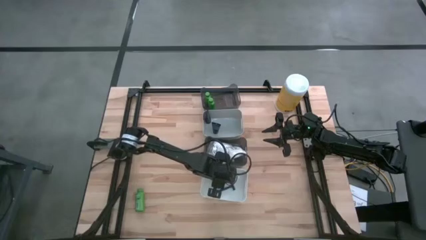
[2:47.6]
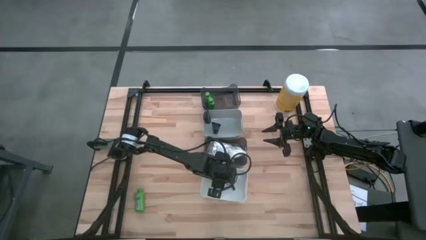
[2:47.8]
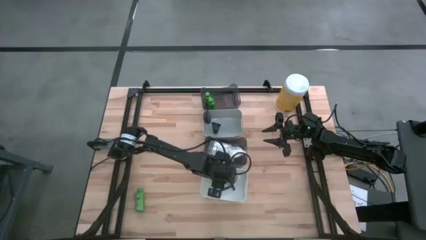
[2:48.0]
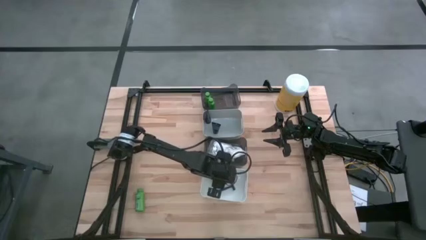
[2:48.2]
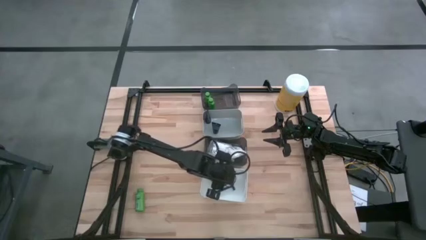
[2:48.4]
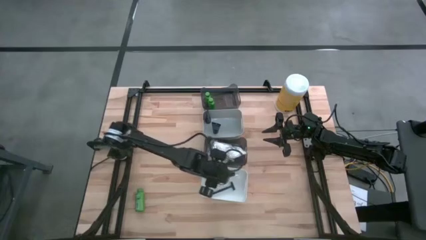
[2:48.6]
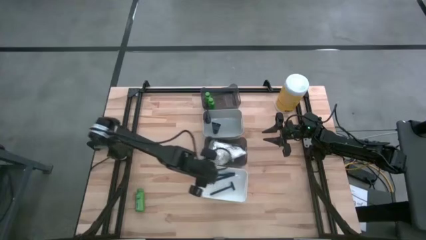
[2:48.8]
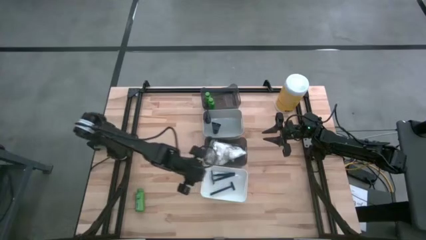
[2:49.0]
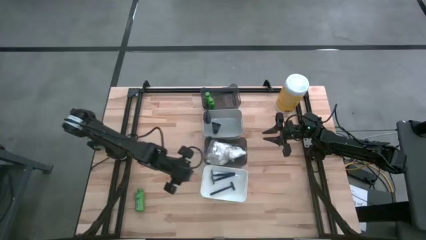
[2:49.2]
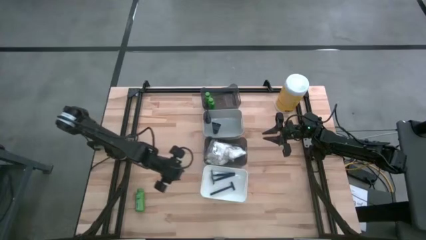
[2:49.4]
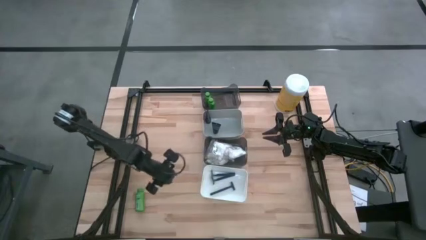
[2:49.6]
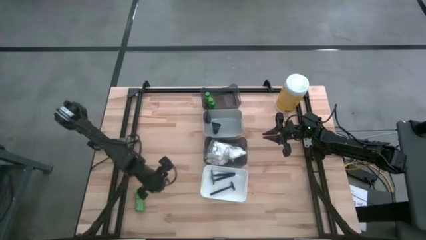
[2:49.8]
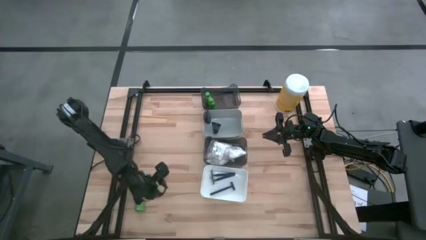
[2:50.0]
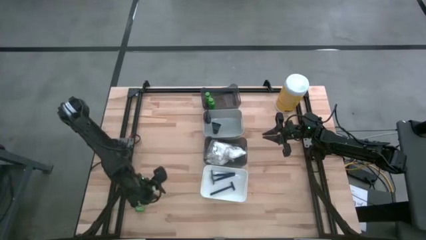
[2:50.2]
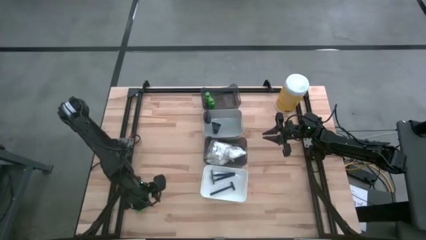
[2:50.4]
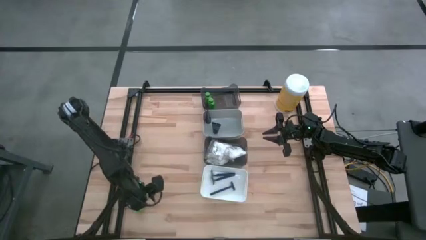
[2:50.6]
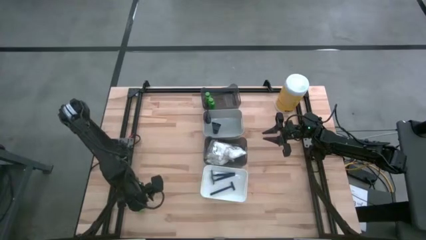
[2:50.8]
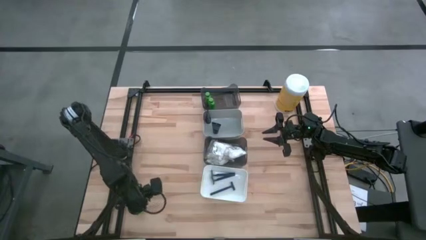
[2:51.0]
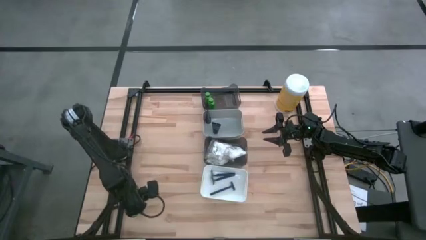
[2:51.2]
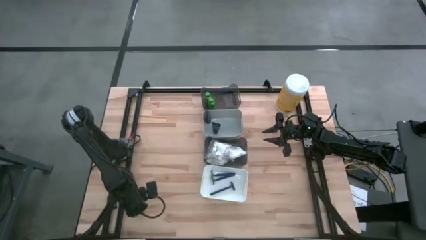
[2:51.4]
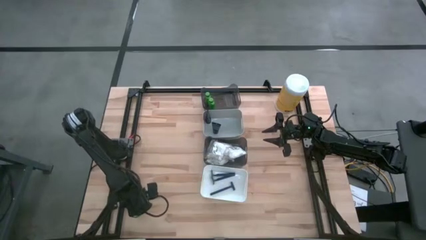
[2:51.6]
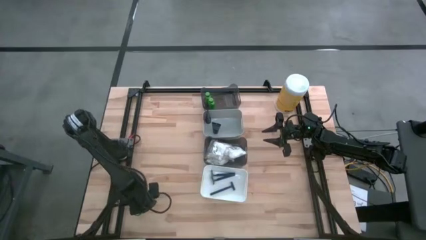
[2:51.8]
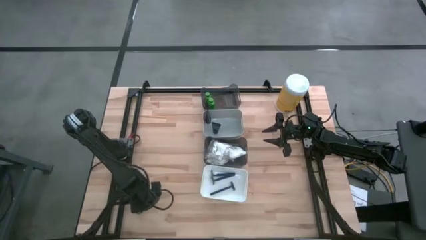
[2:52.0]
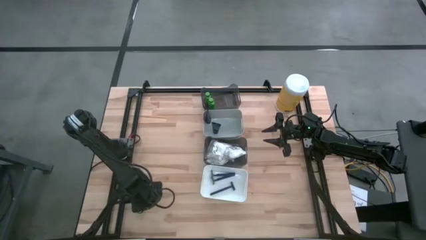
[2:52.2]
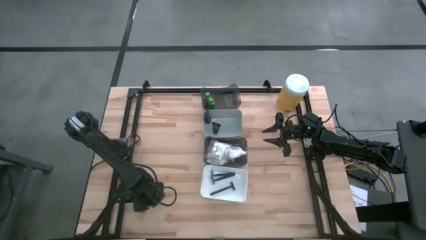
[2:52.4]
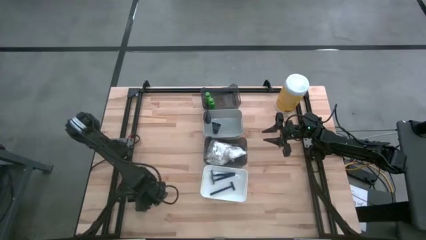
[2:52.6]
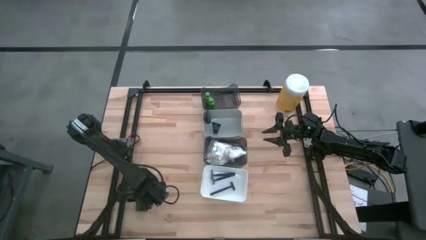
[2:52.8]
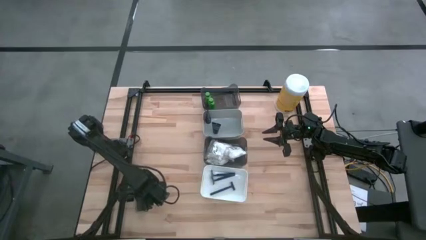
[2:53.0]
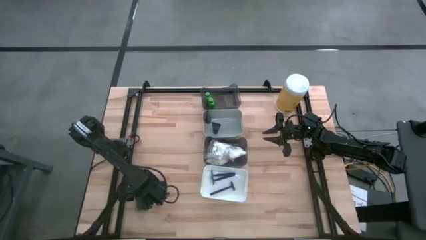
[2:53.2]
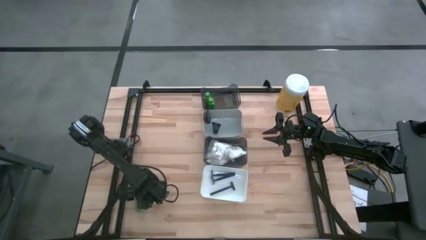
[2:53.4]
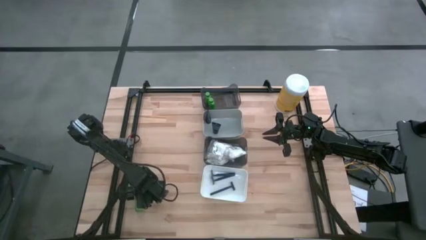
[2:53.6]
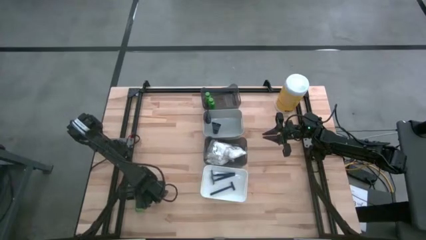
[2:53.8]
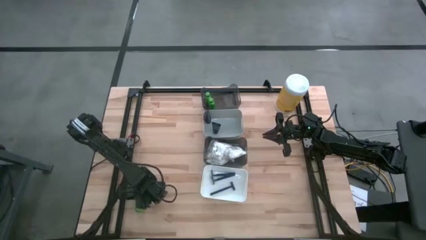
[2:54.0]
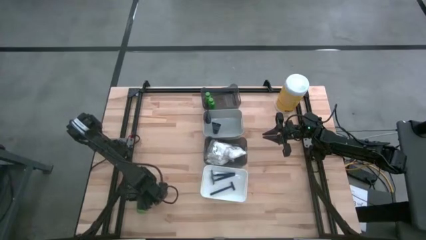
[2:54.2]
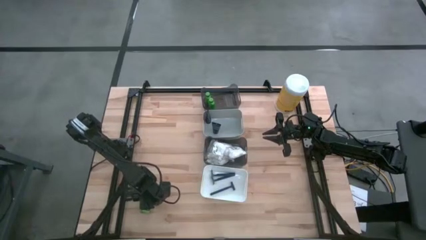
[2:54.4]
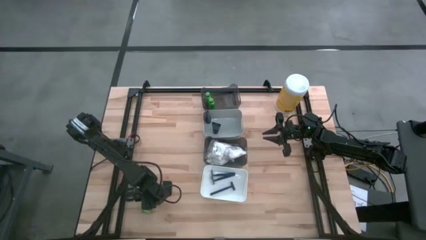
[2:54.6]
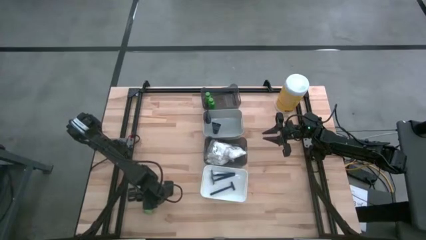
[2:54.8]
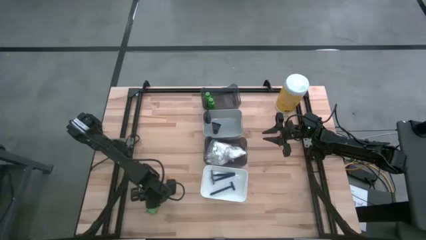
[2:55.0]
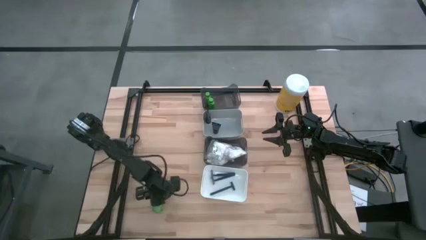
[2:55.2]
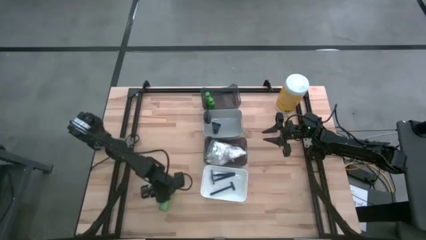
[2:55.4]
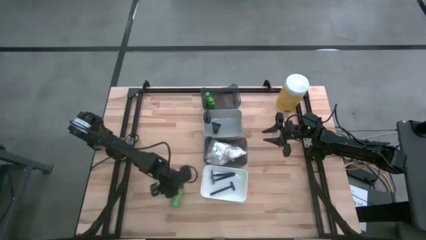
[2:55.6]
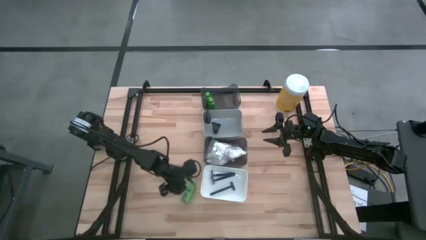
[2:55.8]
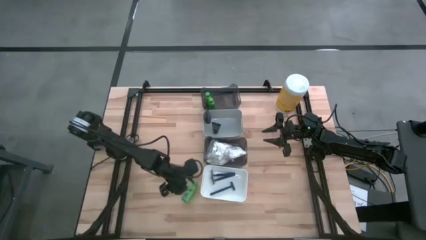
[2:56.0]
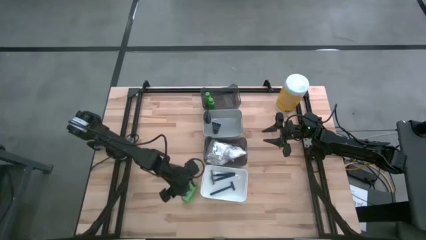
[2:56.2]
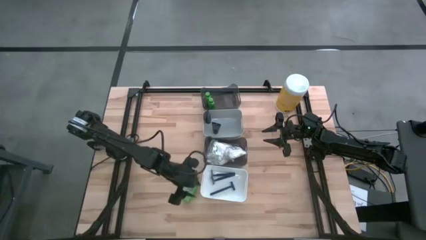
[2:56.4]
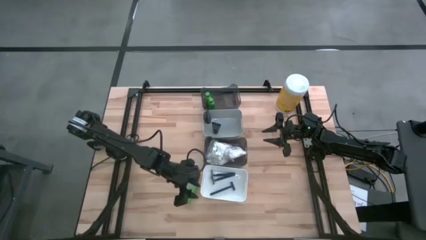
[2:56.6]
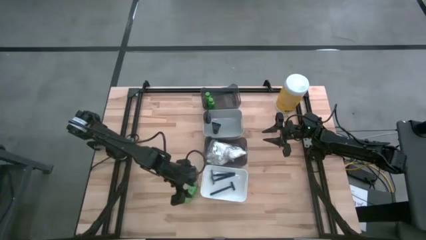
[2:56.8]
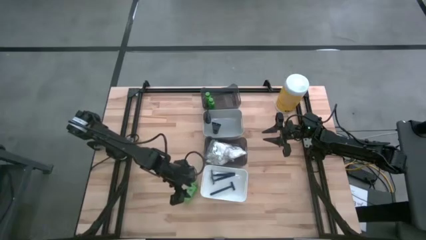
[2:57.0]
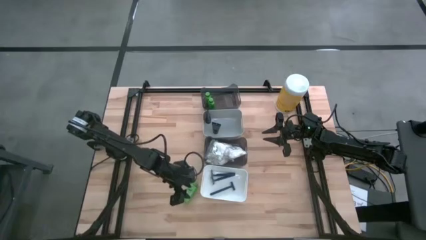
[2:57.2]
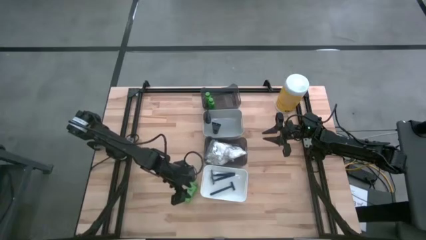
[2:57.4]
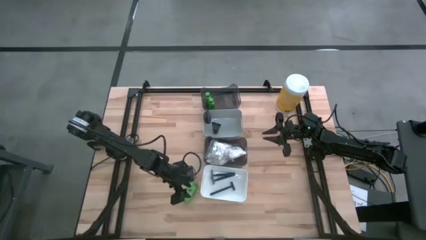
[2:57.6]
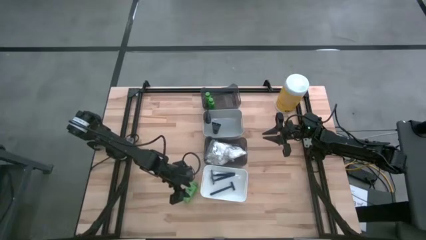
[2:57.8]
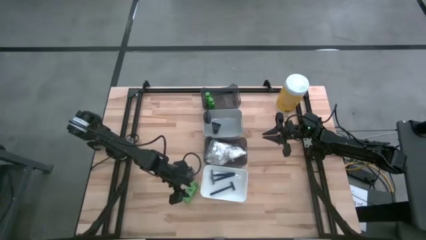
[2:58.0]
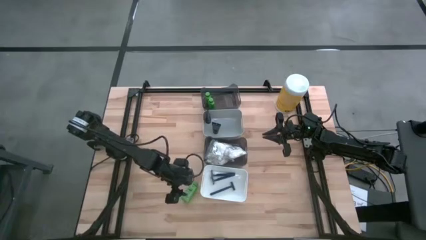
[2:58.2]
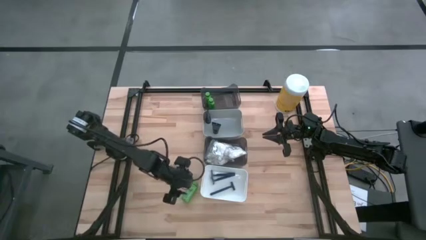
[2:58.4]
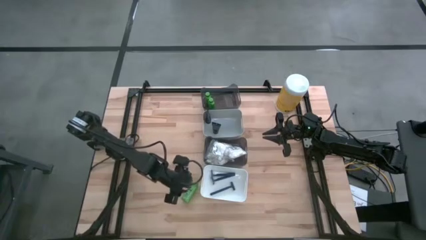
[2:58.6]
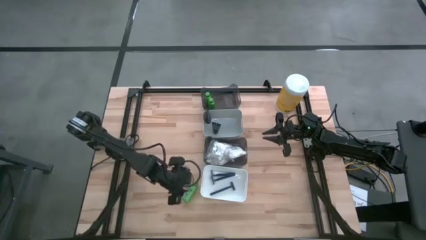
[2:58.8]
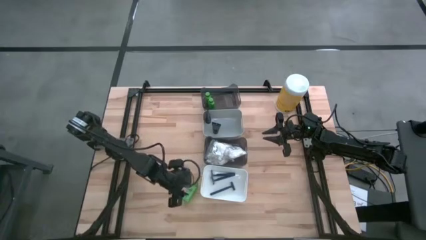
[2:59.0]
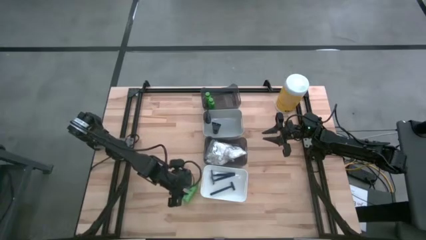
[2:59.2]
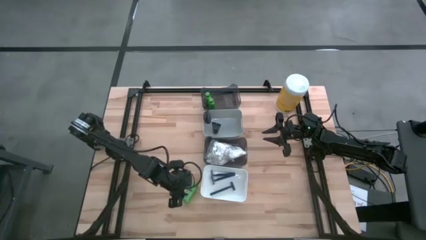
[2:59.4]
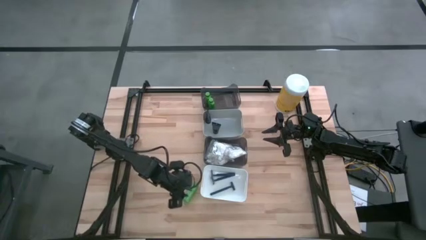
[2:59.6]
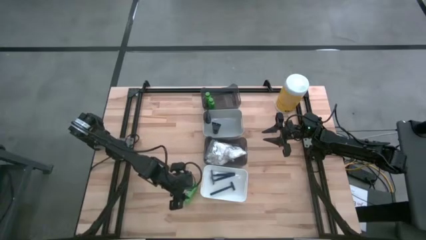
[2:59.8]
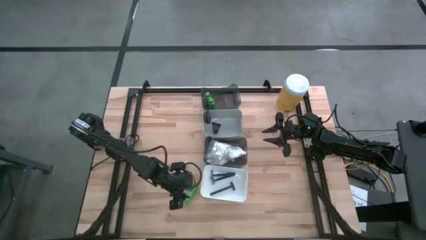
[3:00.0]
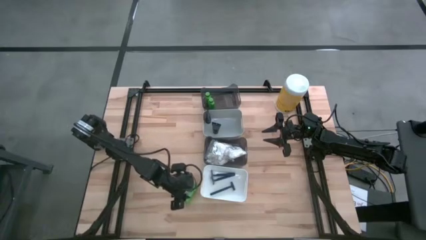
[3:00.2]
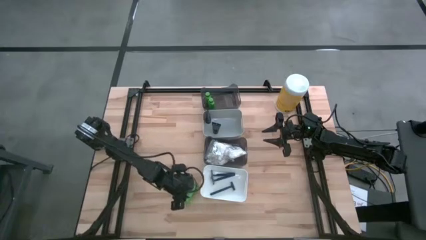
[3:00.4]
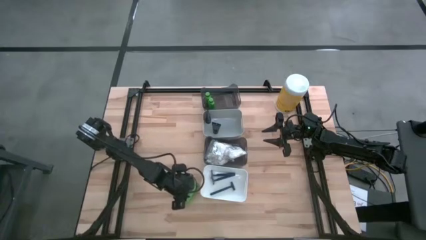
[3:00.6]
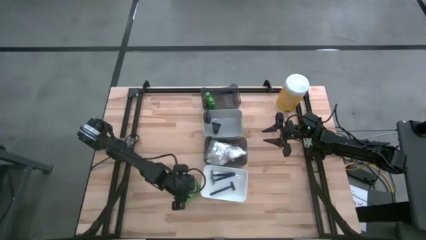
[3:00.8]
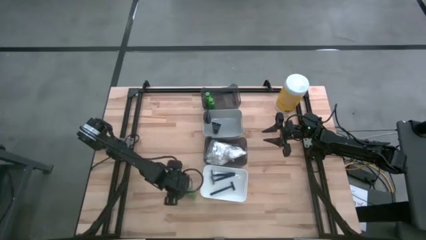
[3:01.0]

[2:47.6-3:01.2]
Task: Pick & Place Travel size toiletries
Put the green shampoo into the top black bin

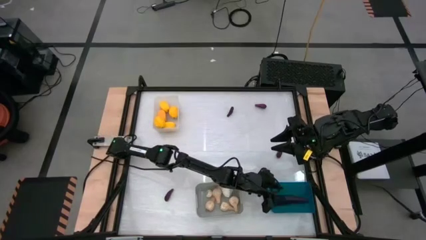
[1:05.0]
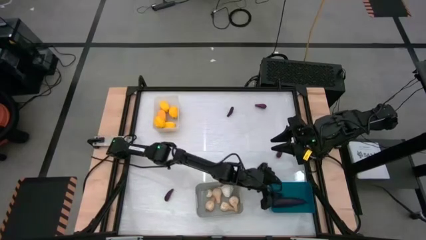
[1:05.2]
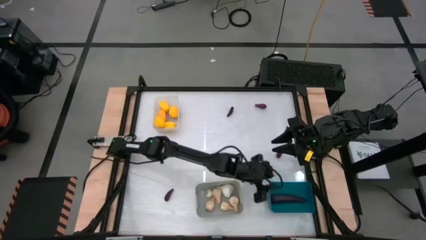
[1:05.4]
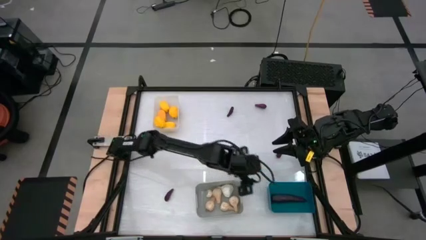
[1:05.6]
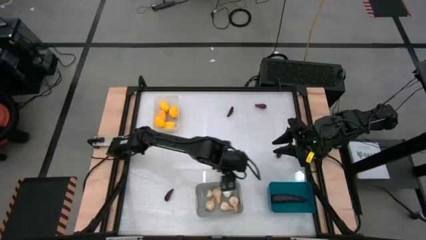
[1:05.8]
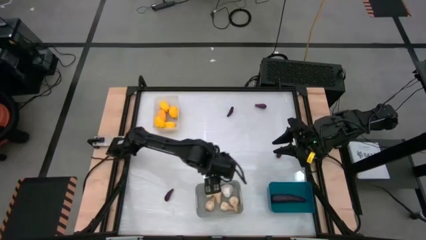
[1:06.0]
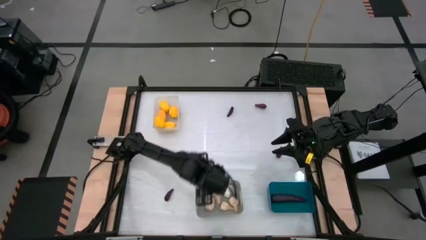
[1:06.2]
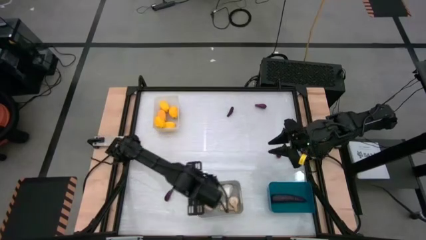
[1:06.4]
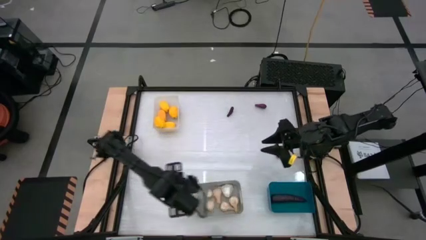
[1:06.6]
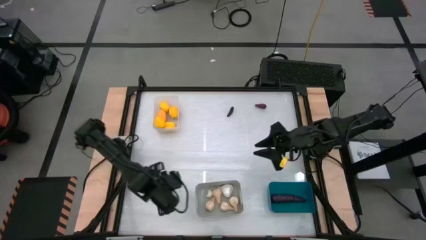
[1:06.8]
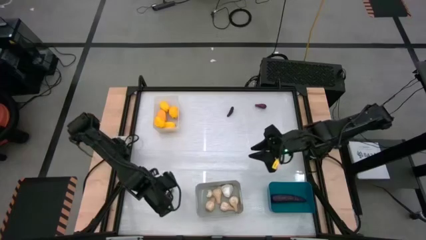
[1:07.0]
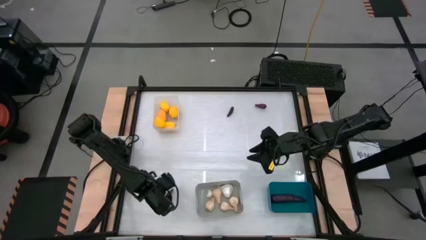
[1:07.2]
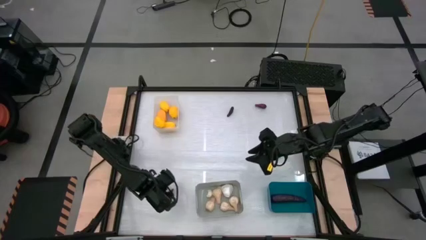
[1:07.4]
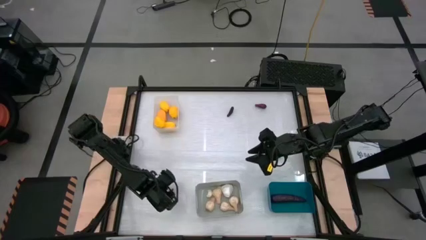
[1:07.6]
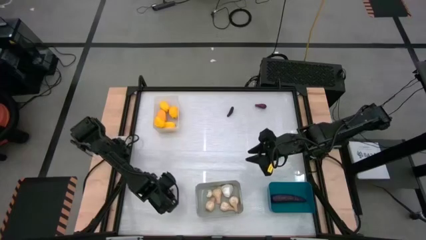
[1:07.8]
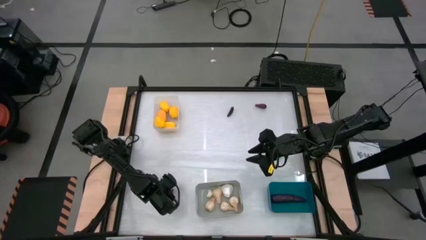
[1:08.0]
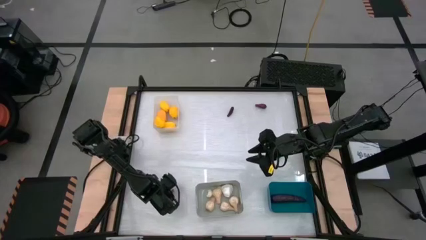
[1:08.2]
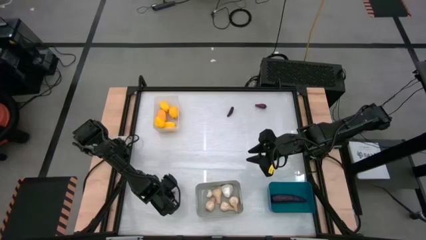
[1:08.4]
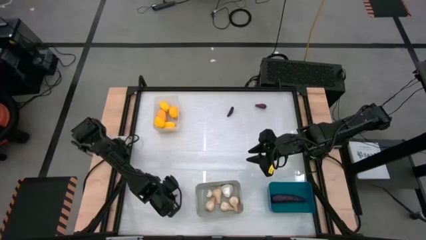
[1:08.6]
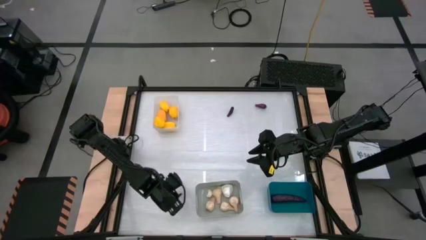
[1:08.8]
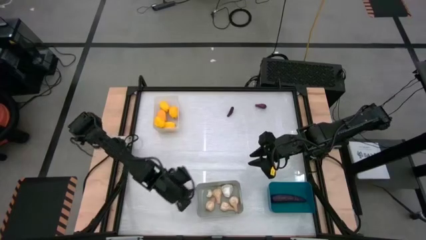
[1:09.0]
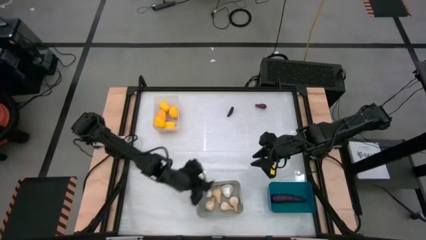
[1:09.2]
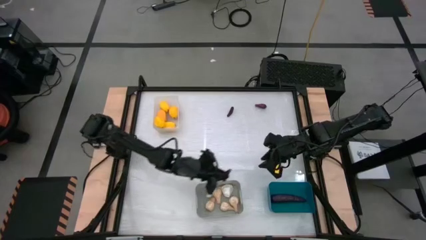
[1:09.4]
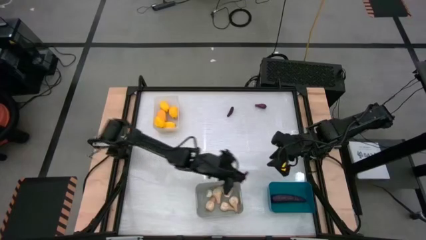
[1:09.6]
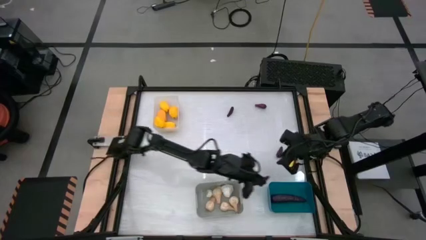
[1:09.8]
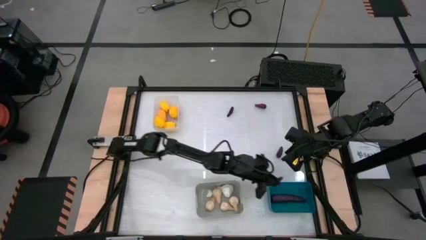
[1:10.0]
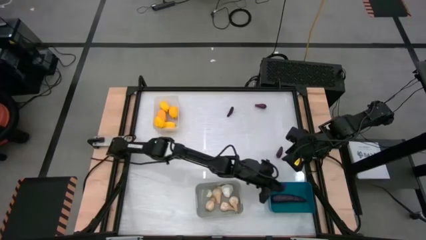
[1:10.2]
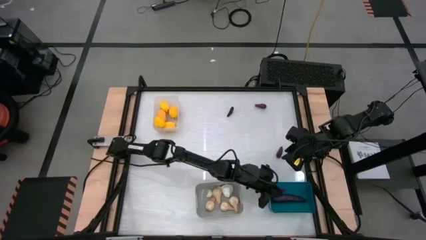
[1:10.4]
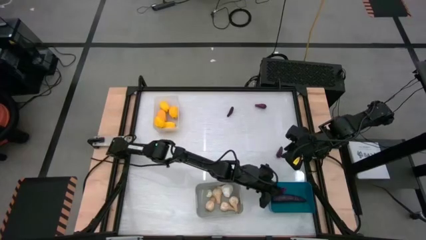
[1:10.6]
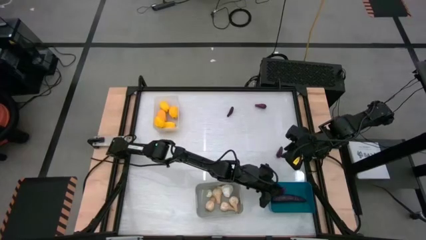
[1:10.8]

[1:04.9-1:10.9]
Task: Sort produce into baskets
Put the eggplant into the blue bin
